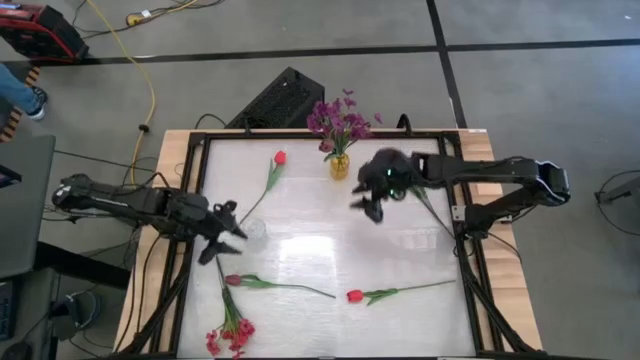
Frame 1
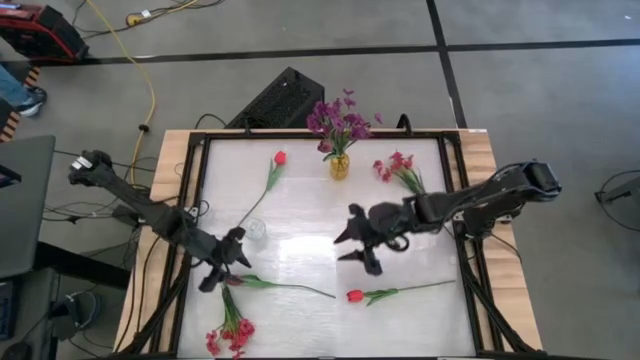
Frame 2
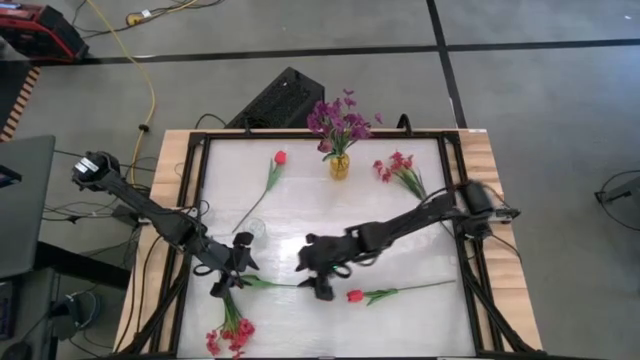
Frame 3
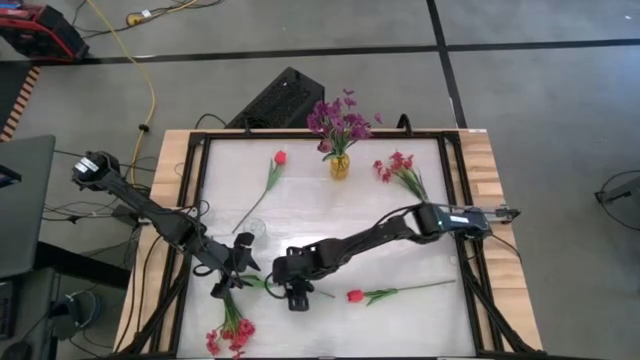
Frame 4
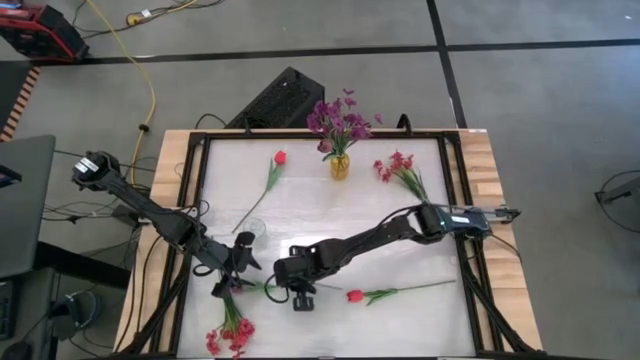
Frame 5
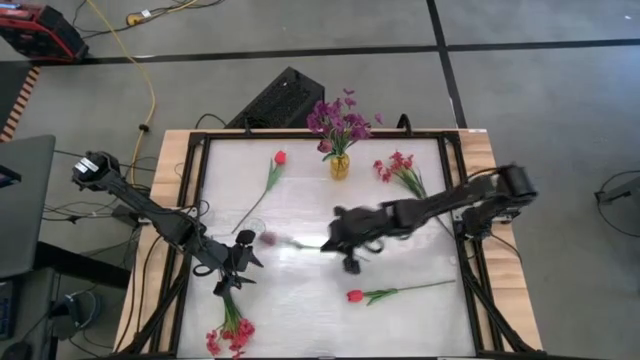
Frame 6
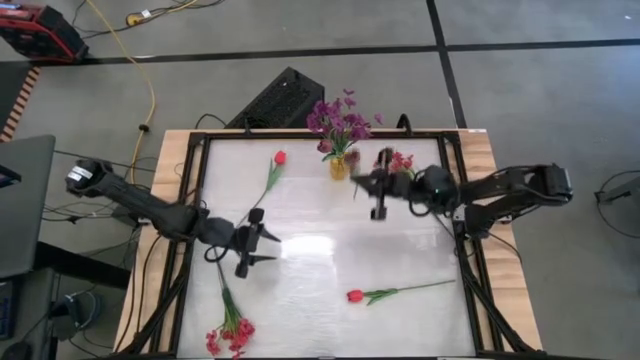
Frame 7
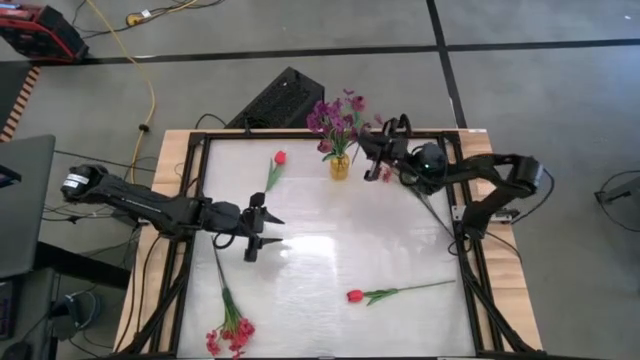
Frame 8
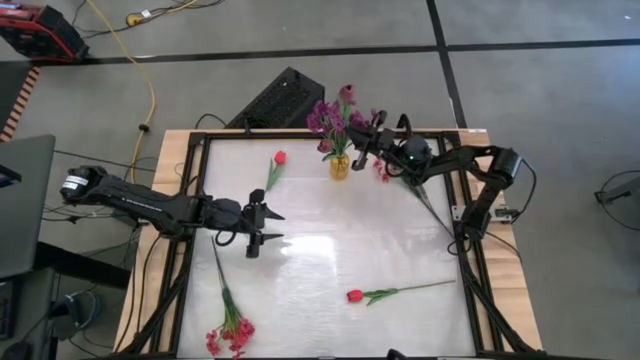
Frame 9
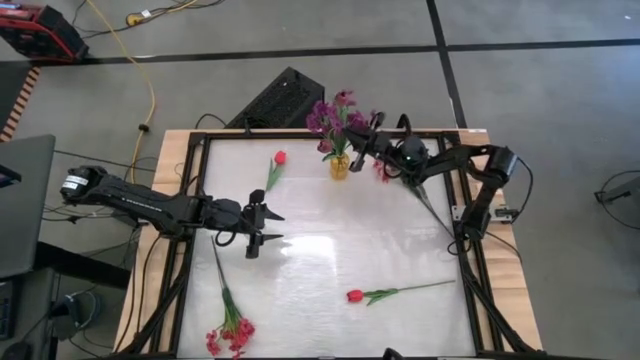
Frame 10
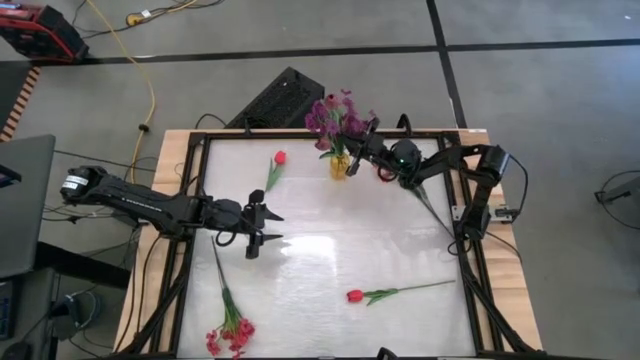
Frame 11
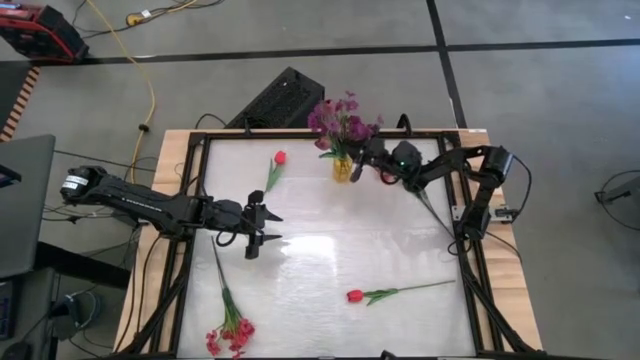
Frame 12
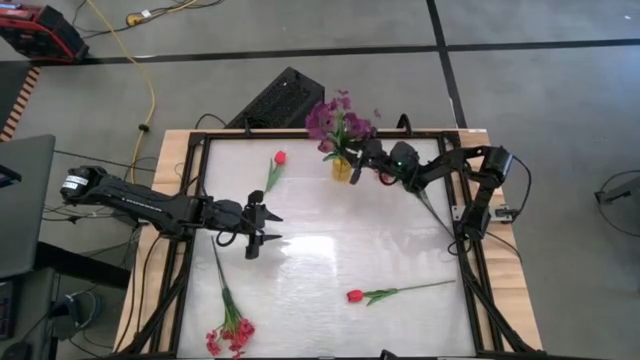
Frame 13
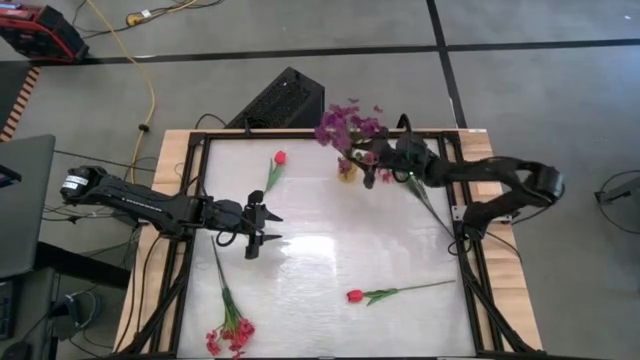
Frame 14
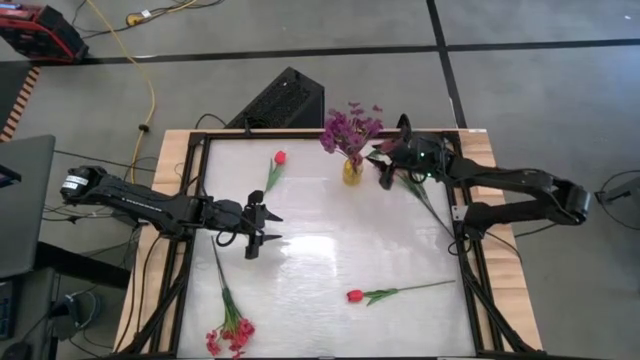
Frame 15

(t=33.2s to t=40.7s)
Task: Sort flowers into vase by color
Put the violet flower into the yellow vase

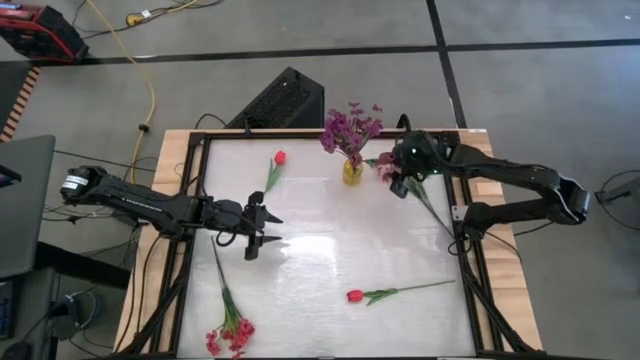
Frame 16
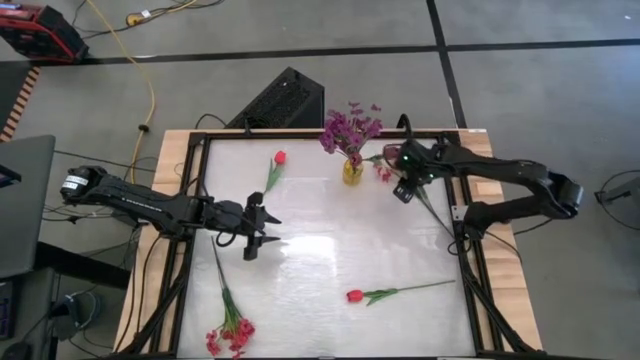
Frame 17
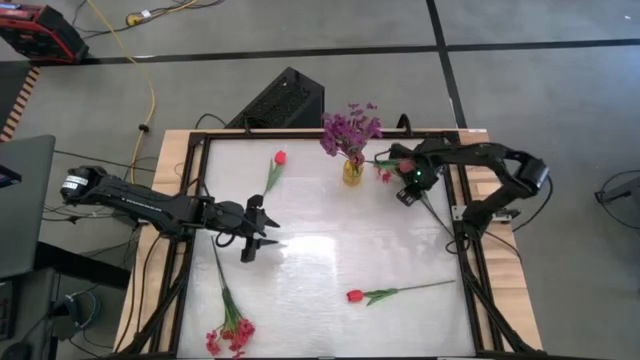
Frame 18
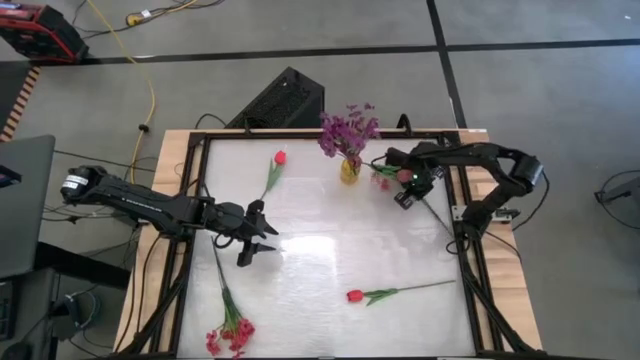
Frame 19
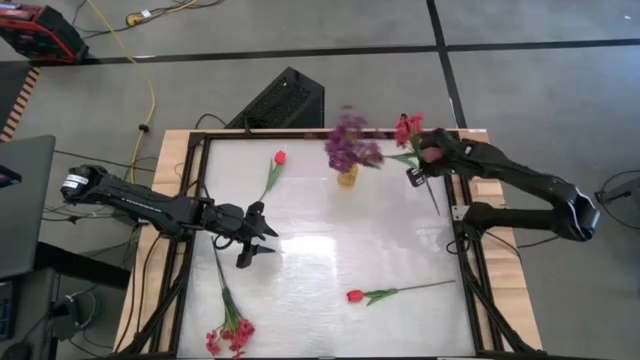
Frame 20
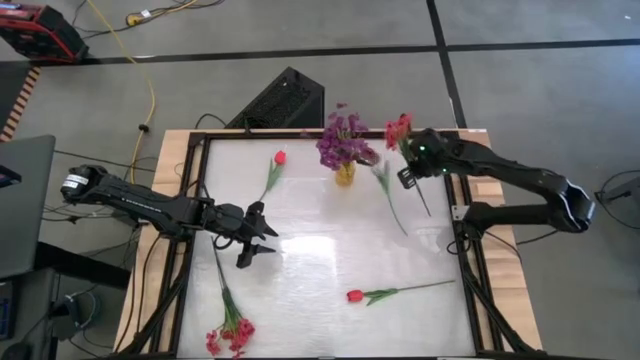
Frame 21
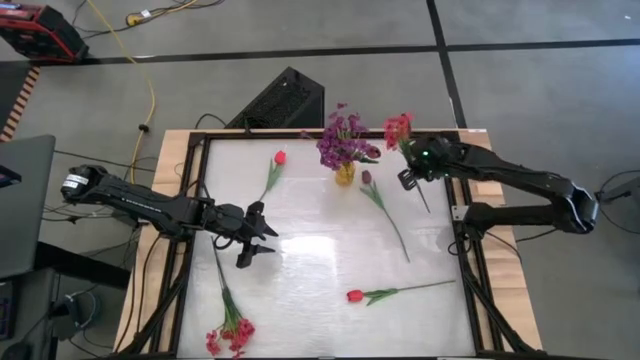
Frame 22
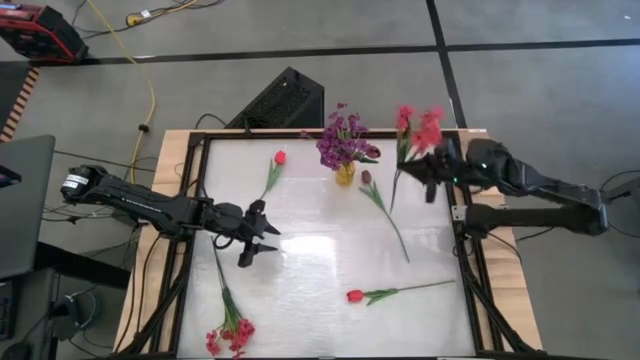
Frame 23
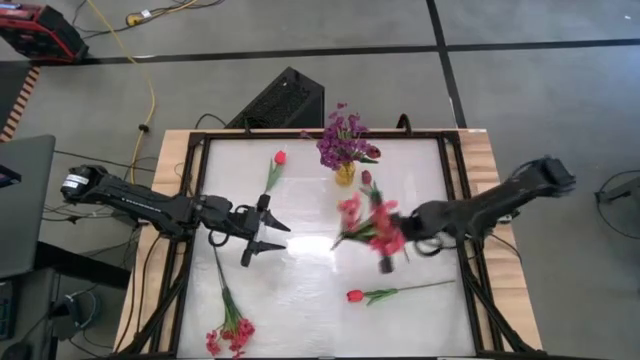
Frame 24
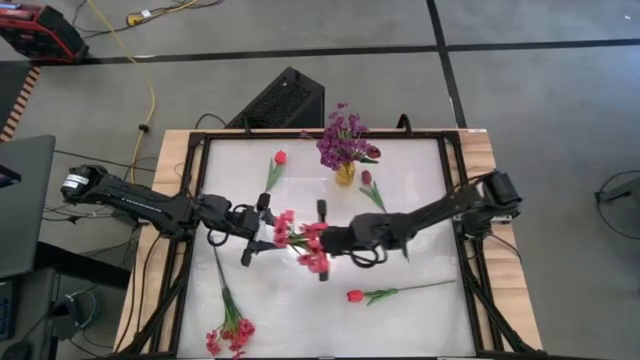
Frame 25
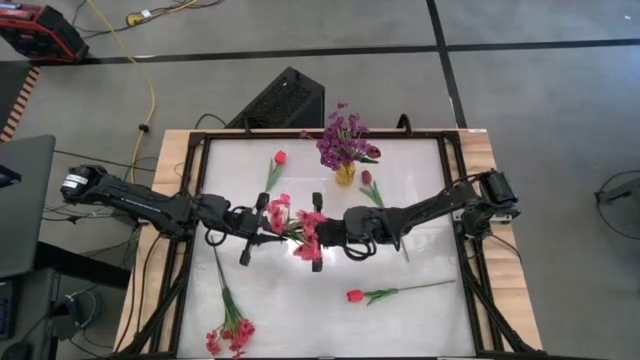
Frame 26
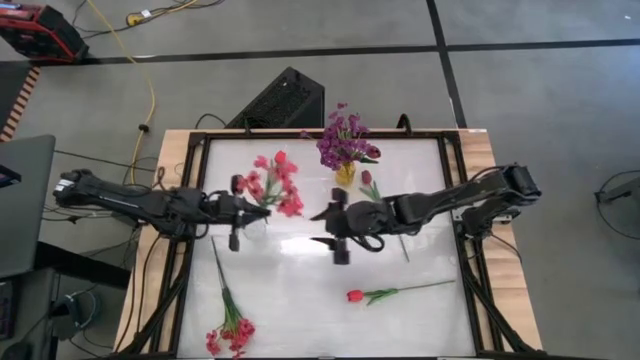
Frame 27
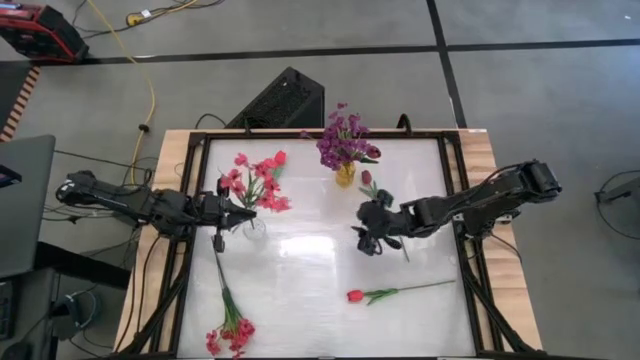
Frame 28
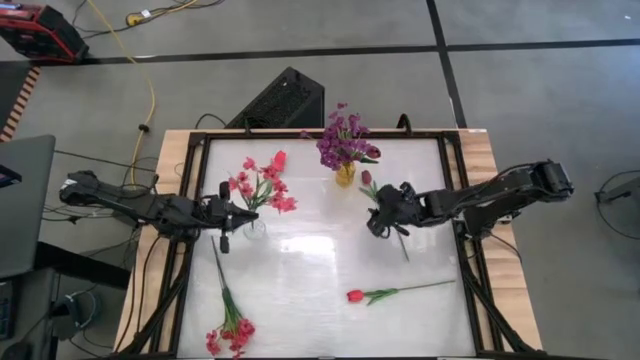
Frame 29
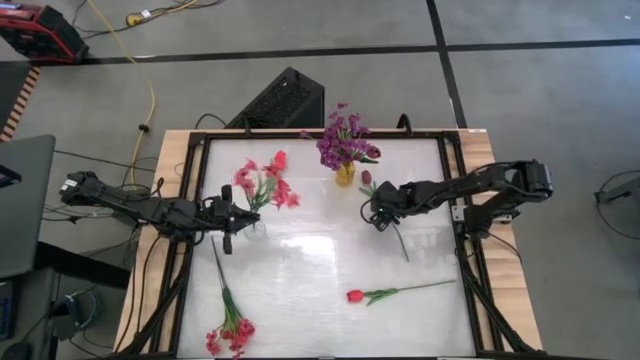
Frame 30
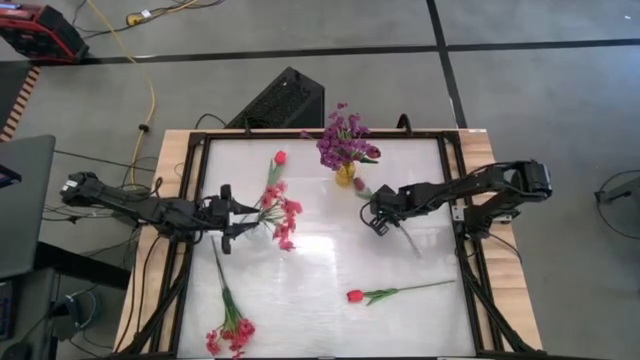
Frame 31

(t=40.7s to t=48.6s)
Put the top pink flowers into the transparent vase

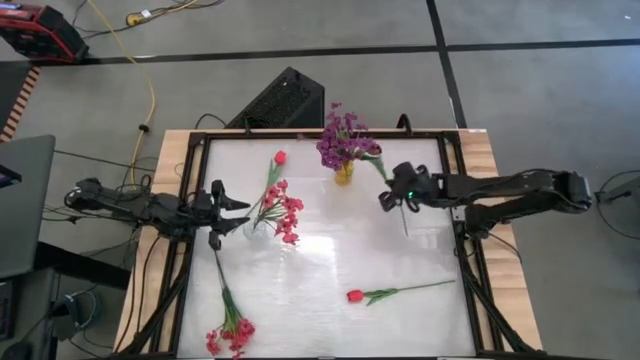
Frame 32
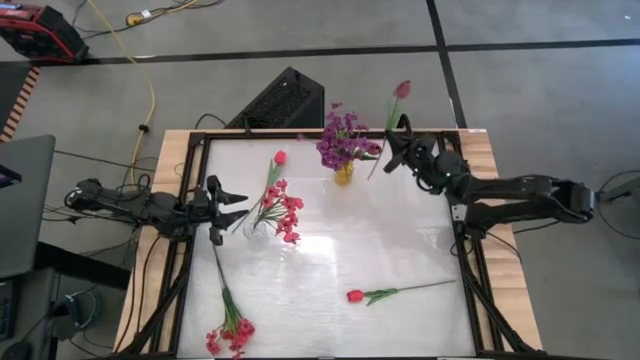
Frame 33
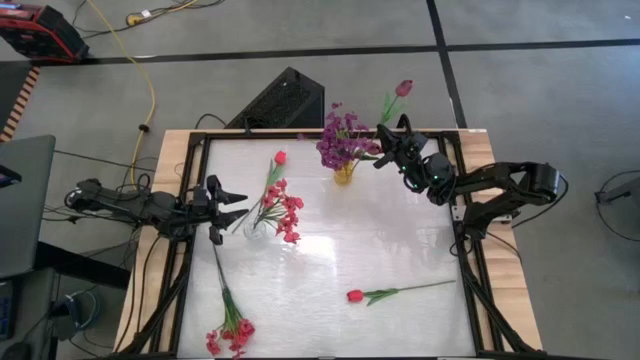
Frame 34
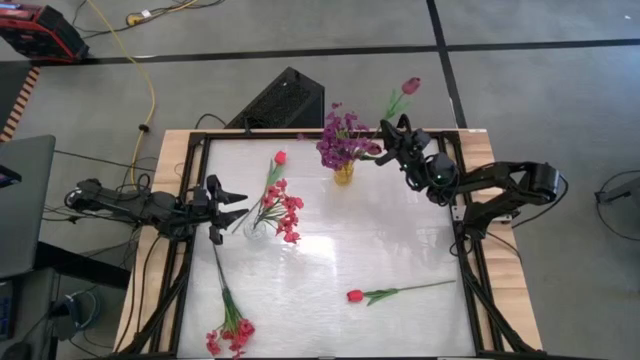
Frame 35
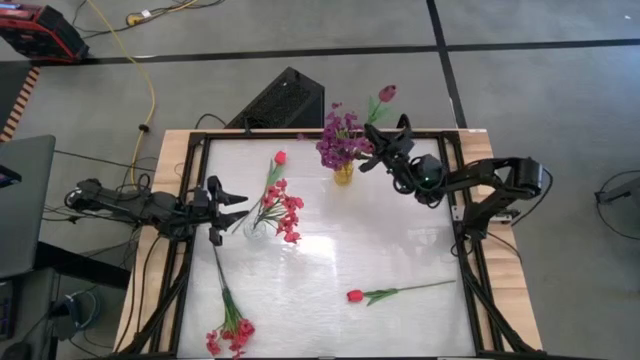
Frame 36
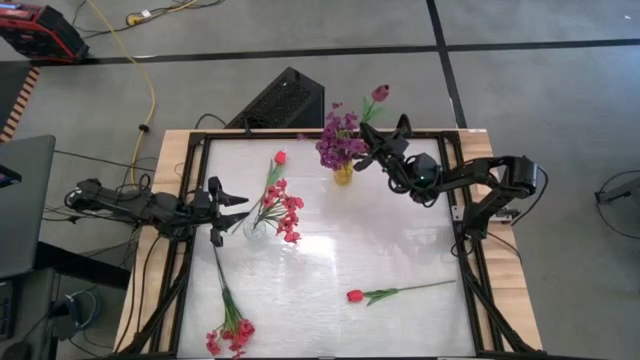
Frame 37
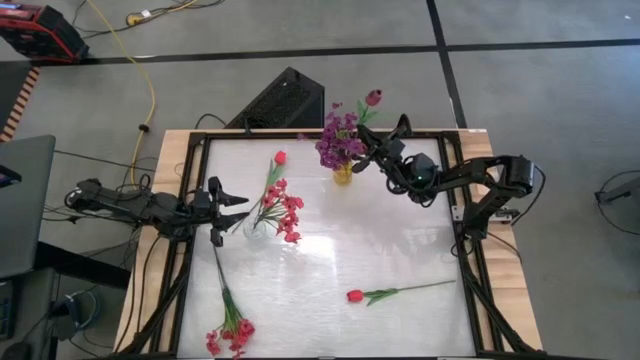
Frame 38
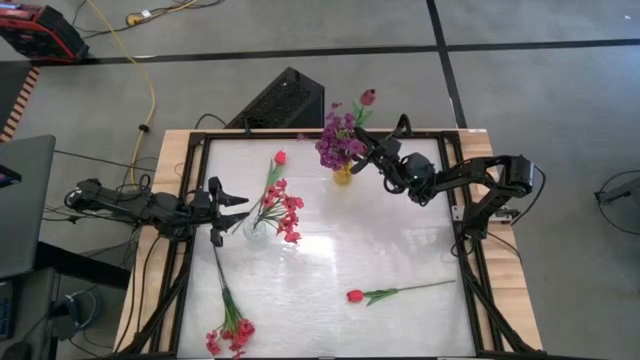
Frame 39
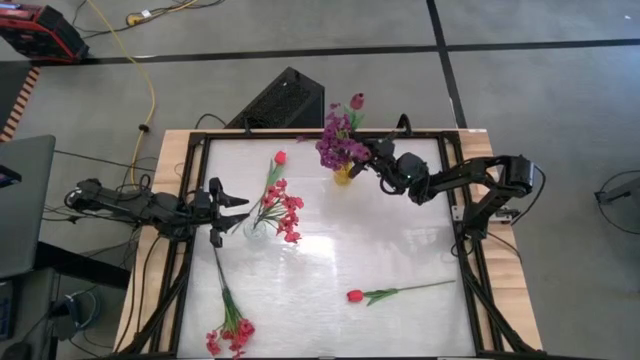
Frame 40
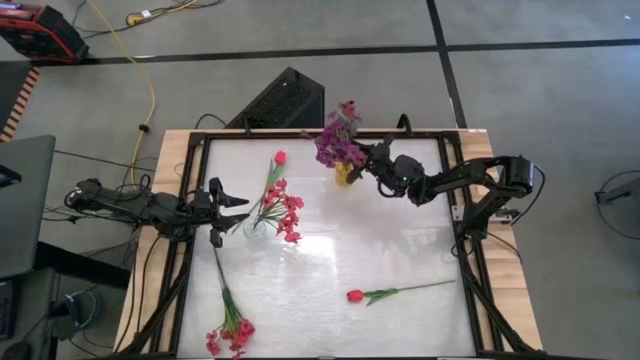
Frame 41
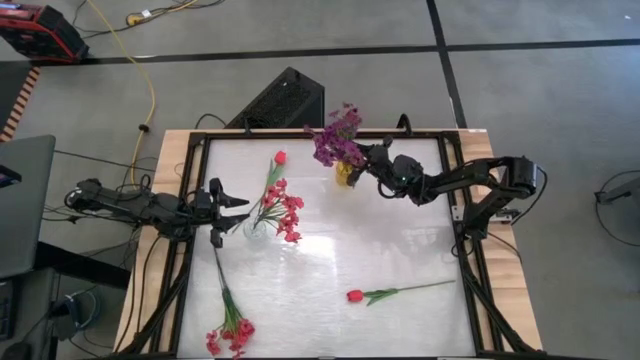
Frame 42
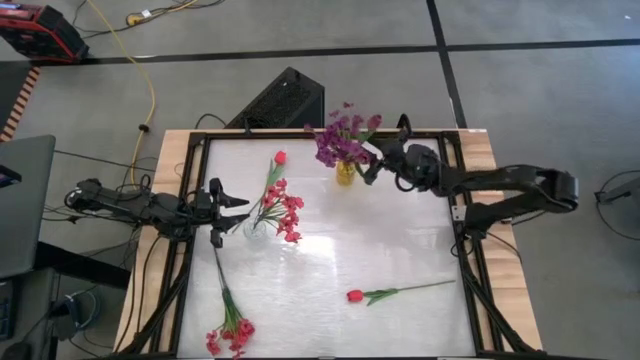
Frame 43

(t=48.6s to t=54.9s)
Put the violet flower into the yellow vase
